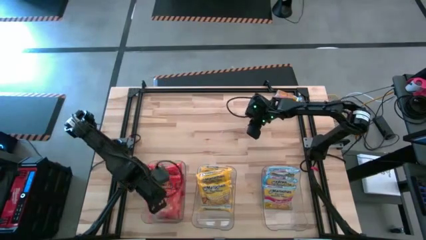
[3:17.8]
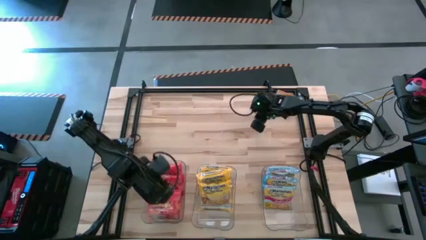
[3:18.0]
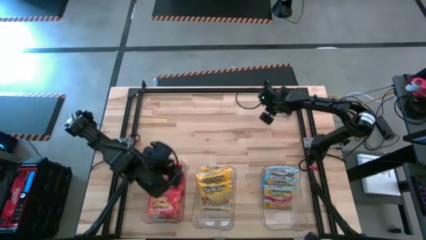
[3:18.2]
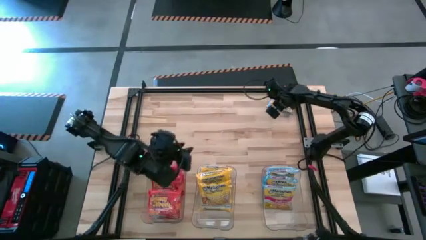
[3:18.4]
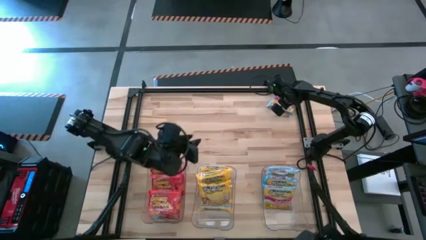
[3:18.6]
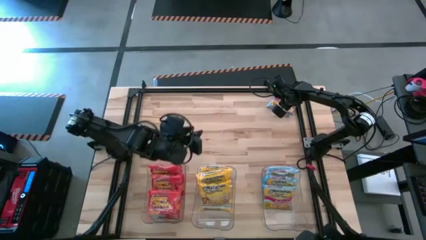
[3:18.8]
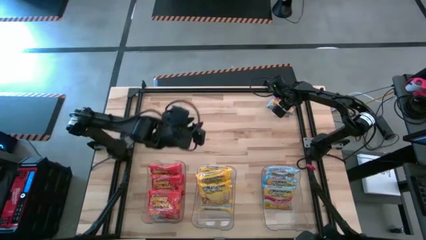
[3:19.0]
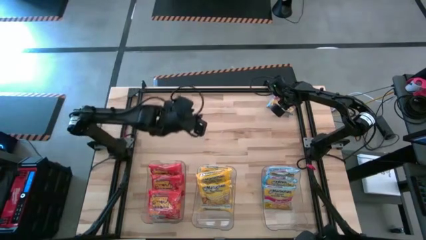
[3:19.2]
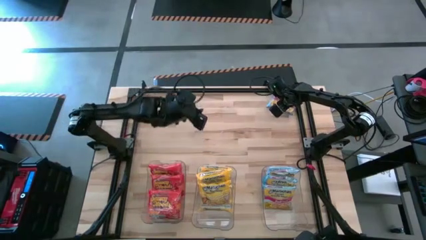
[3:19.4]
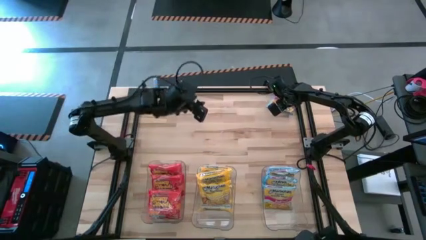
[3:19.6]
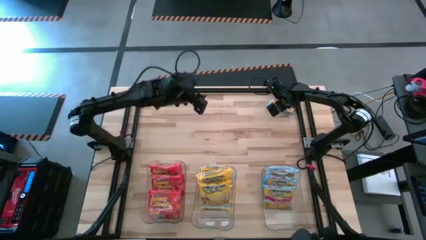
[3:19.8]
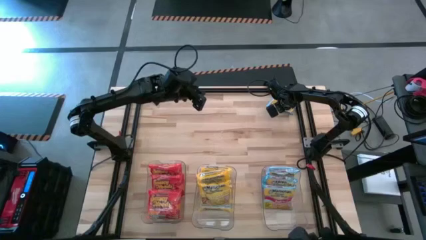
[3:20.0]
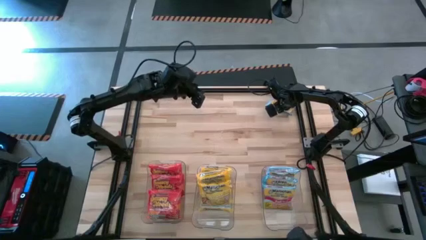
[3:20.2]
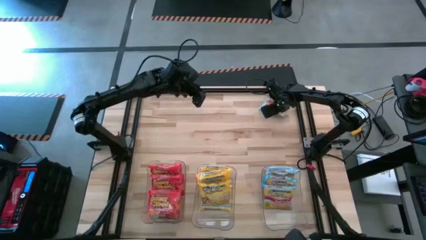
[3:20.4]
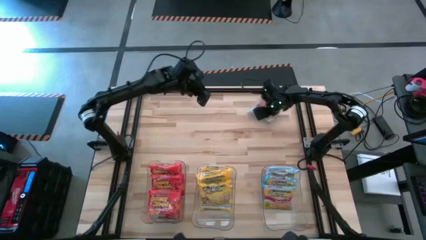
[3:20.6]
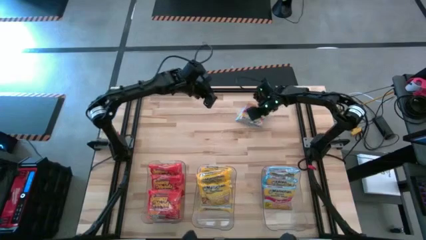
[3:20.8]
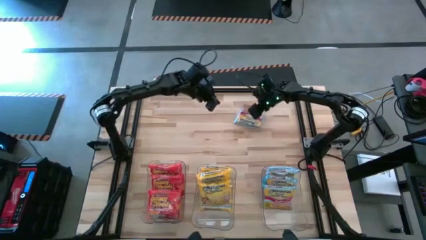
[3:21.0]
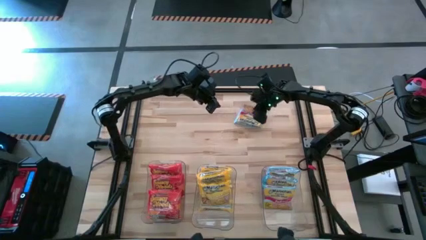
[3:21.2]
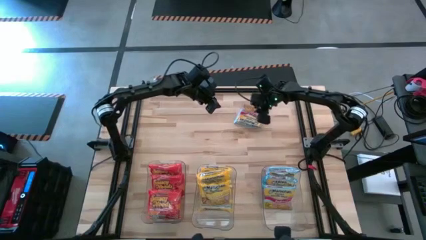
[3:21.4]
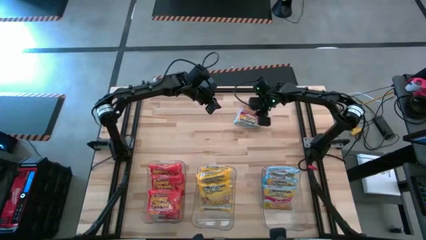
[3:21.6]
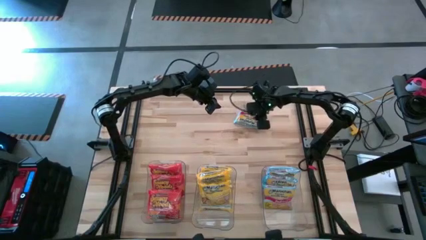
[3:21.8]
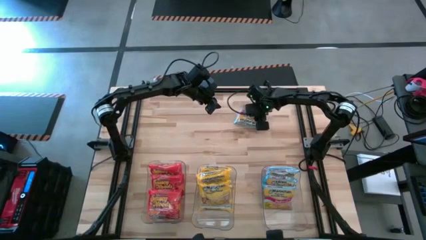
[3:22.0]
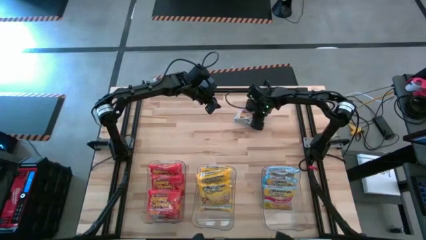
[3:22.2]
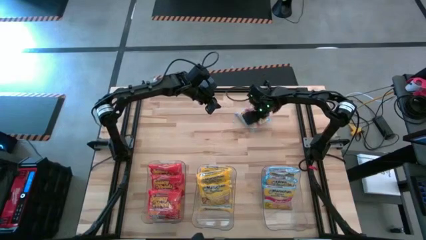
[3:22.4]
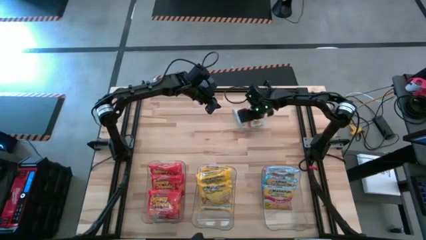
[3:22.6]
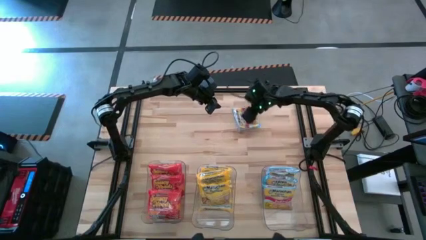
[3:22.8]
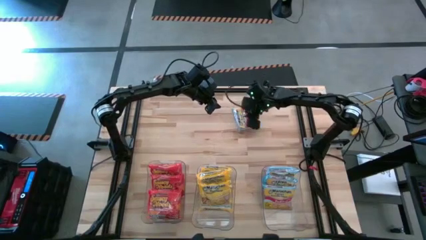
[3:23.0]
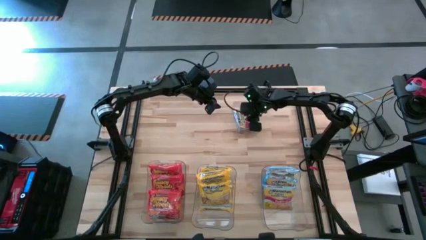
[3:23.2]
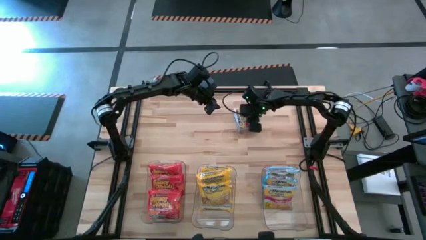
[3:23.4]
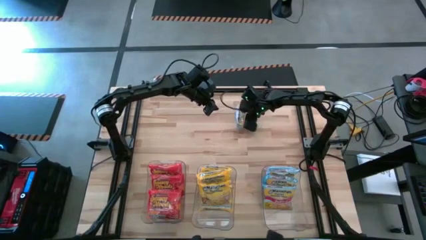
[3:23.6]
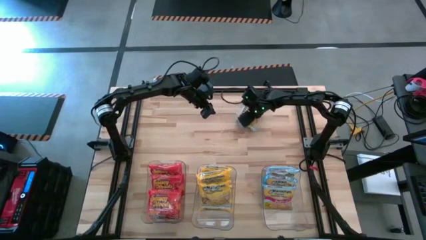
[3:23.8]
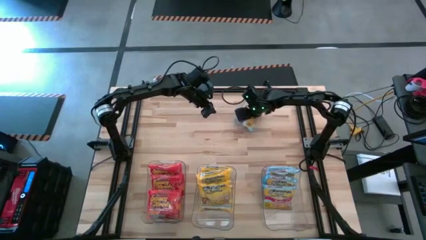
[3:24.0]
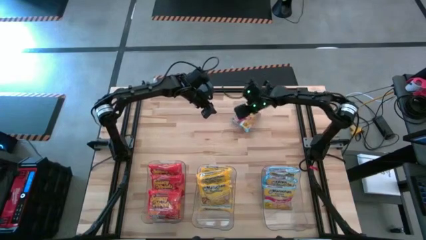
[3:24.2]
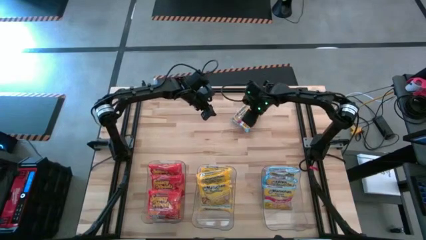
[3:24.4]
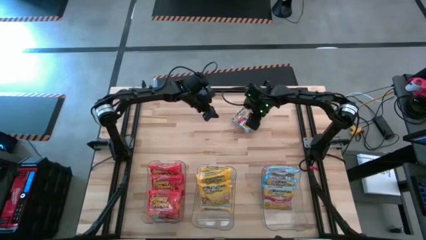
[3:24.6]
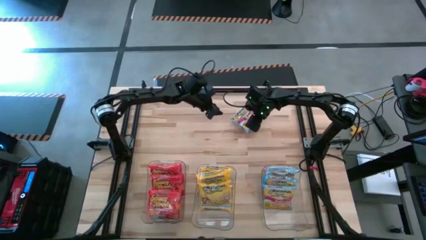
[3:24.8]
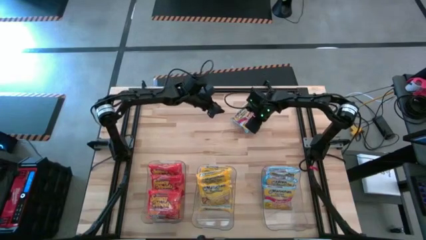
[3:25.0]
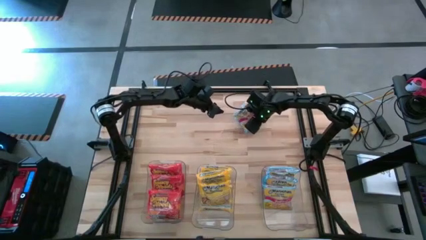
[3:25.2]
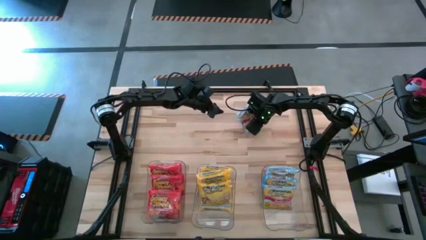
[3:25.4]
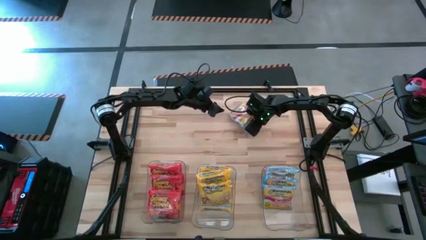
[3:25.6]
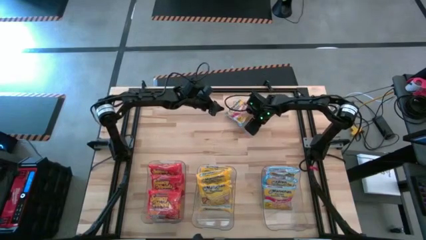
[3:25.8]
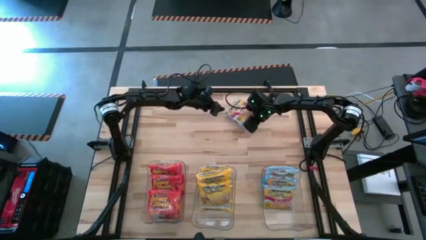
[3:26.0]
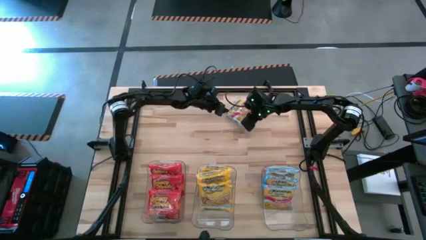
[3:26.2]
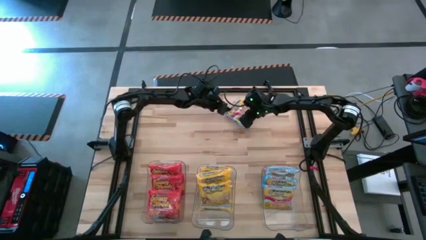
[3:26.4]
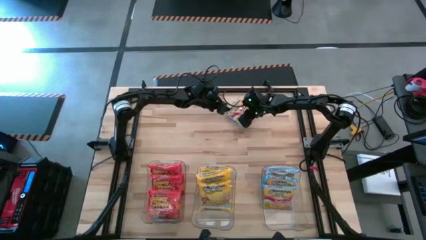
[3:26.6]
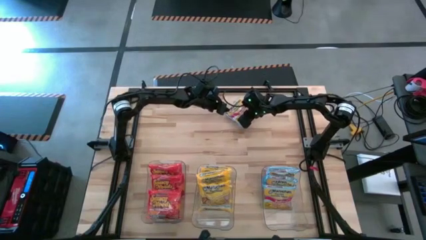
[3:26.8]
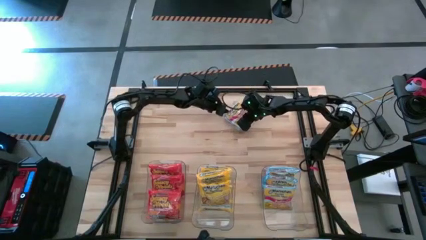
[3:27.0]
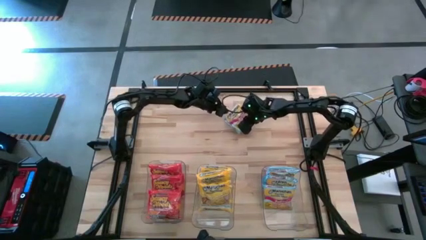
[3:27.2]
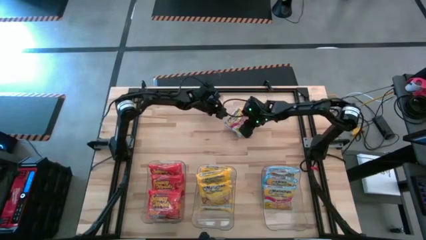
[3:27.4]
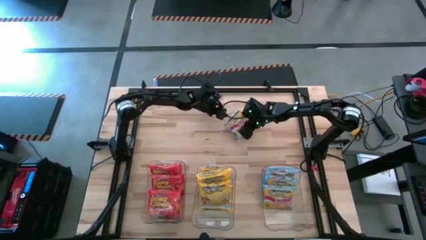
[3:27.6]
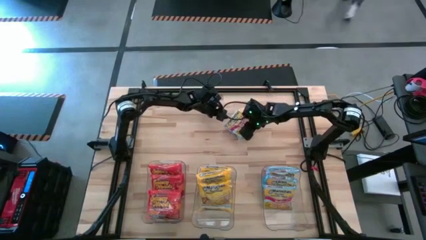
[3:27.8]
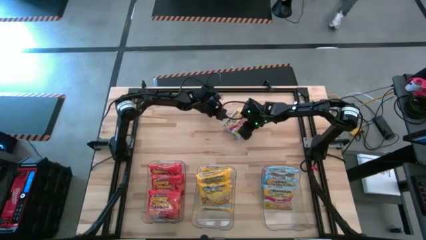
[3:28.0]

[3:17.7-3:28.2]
Task: Sort Maruchan noodles
Put the blue noodle pack into the right transparent bin

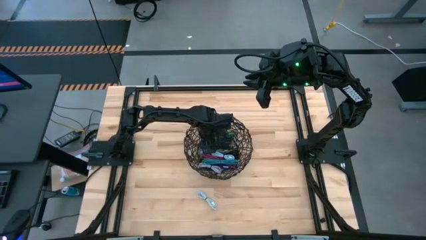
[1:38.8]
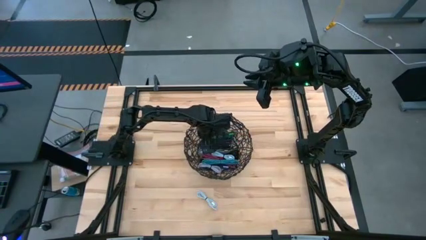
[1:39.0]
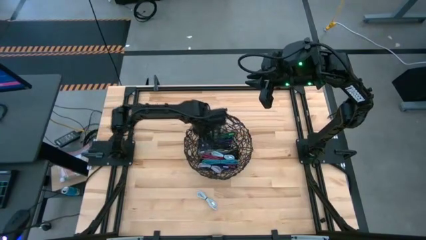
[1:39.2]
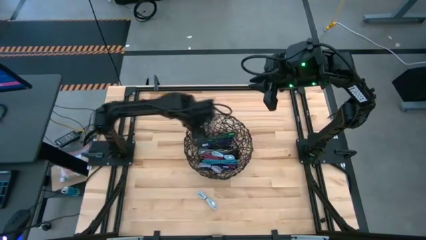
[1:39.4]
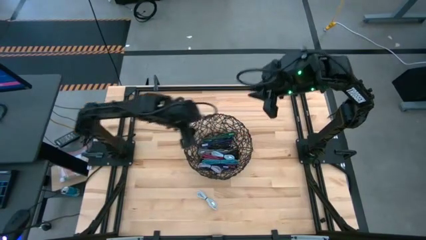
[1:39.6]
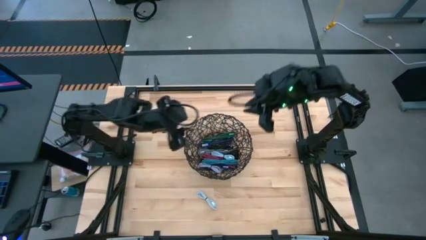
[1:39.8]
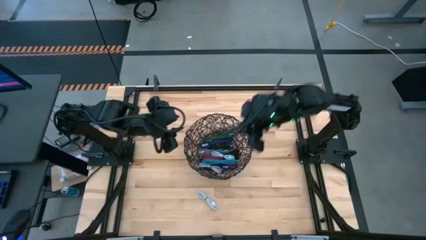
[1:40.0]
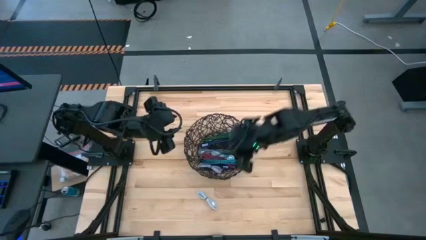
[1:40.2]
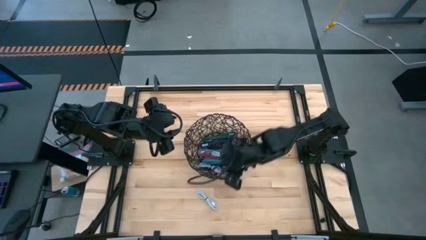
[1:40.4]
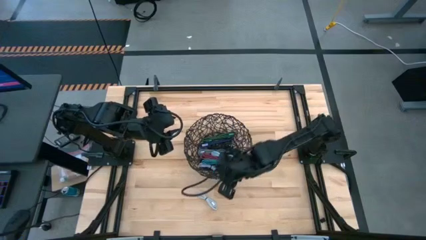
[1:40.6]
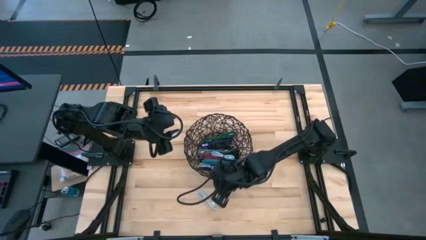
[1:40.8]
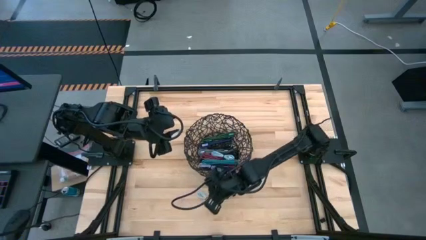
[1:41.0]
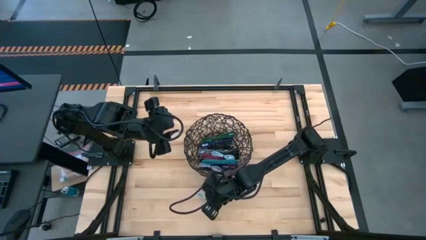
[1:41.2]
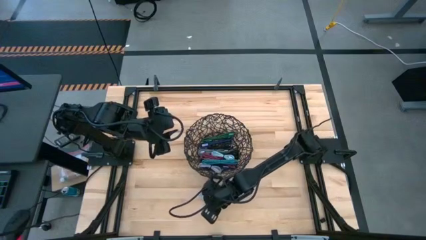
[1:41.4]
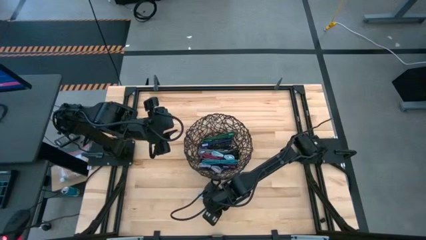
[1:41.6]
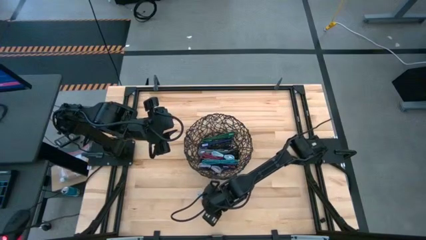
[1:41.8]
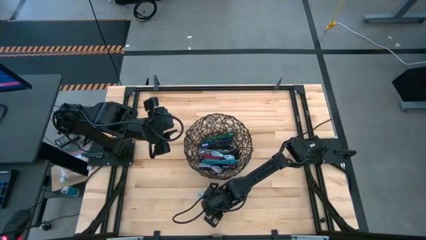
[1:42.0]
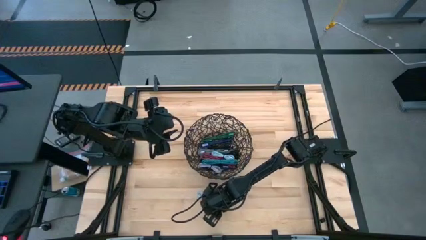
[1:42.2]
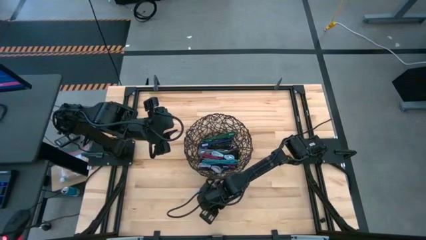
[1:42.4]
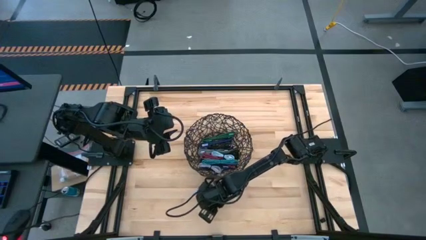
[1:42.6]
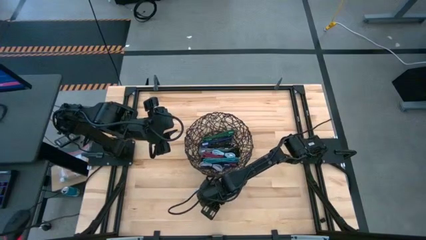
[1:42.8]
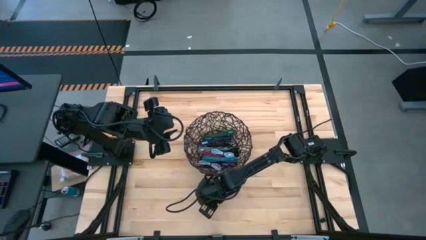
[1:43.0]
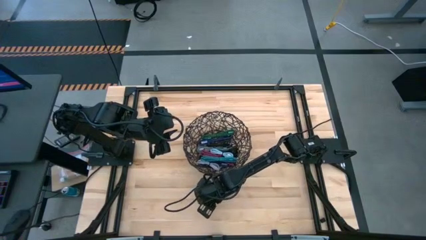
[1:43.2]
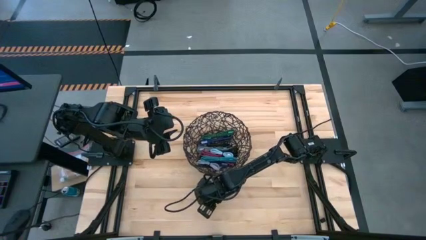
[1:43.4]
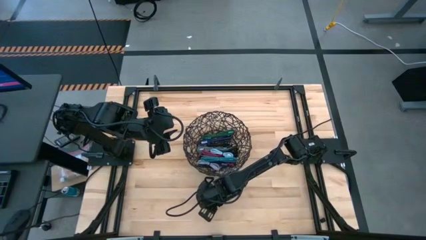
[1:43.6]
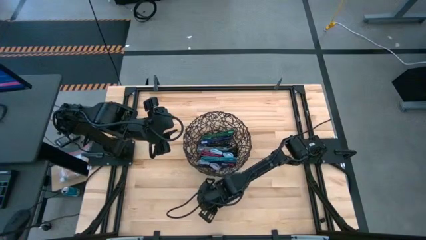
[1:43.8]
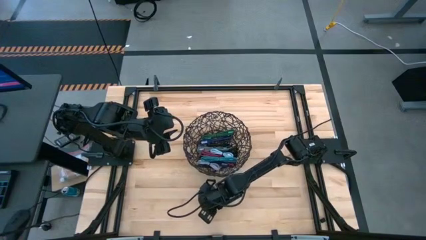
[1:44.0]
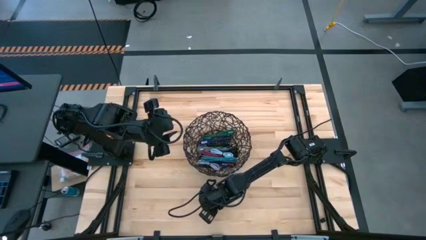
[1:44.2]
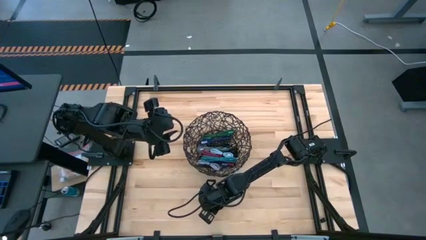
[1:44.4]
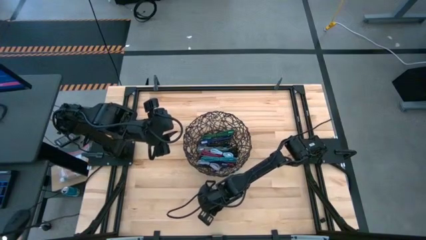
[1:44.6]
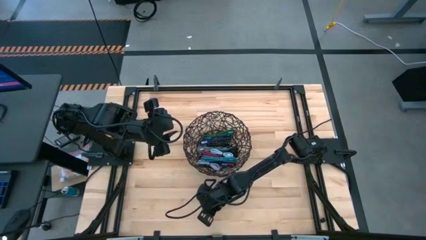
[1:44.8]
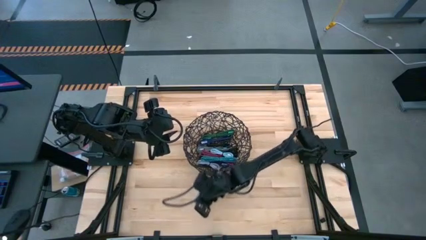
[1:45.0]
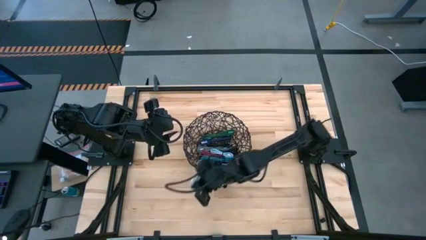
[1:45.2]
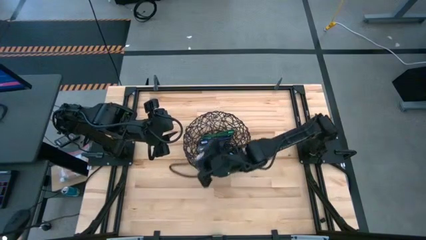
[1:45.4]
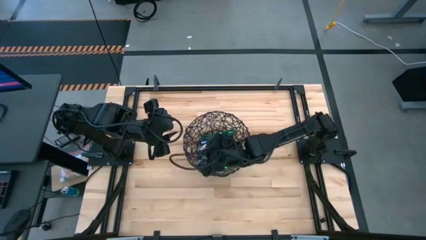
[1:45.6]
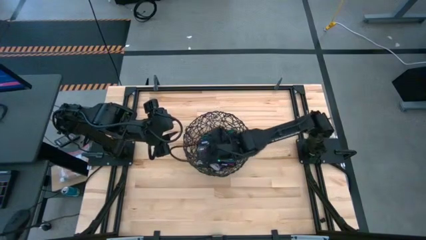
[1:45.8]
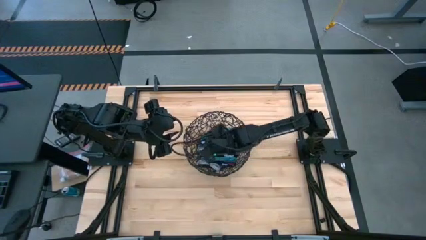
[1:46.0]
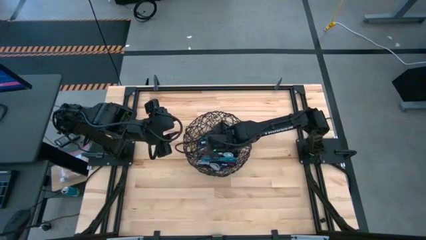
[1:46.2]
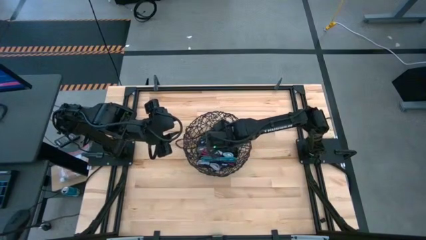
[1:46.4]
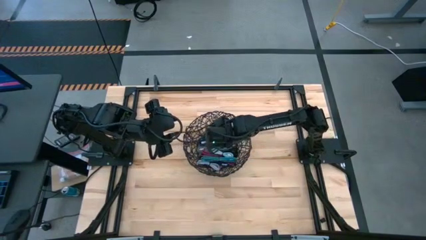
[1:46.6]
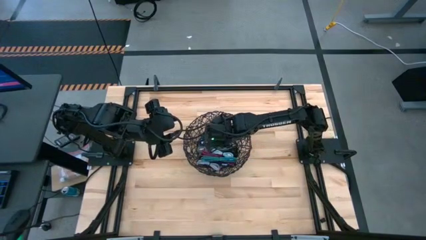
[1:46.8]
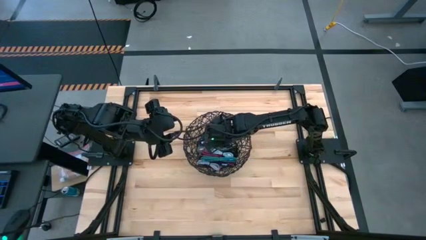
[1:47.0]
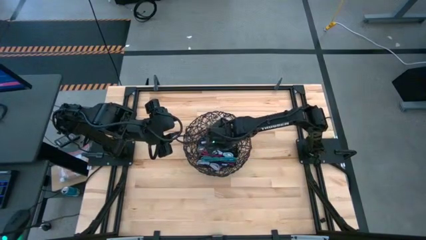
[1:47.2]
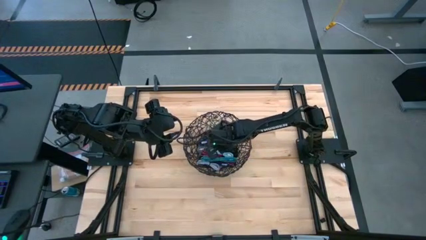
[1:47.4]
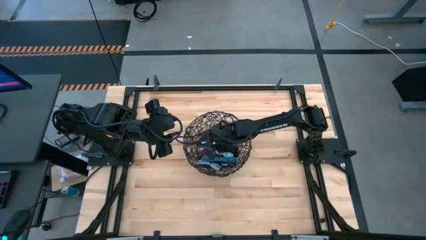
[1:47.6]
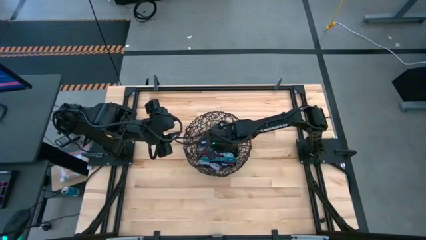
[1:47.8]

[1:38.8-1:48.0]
Task: Pick and place USB-C Cables
Put the gray charger cable into the black mesh basket
